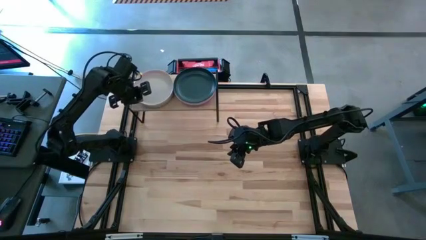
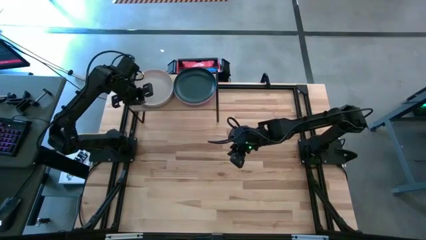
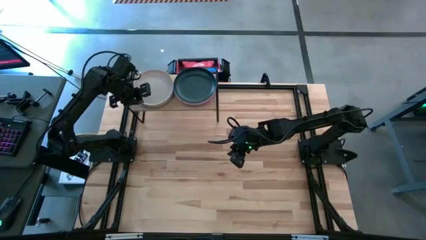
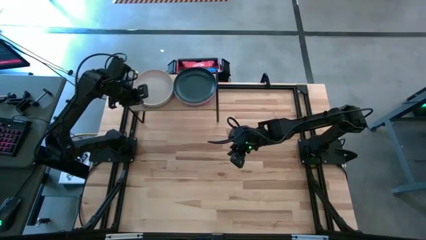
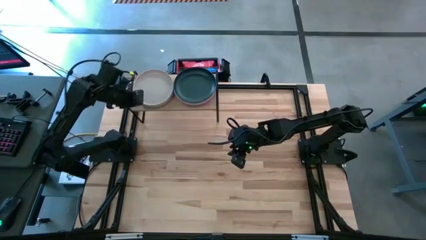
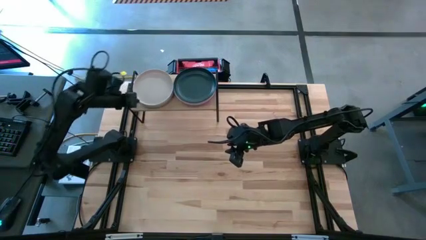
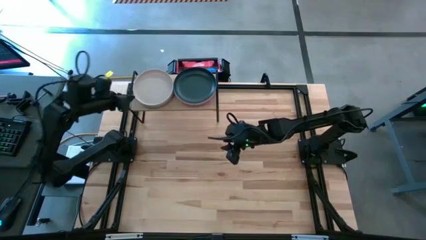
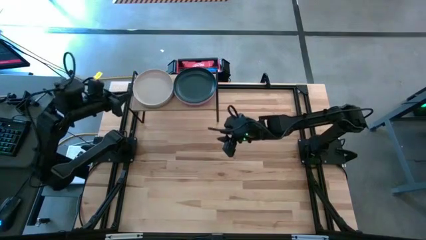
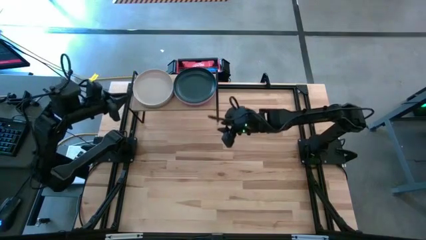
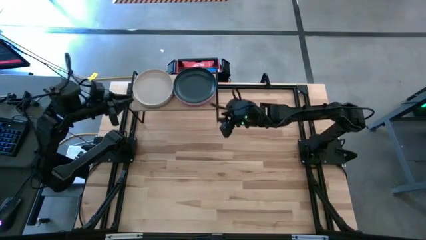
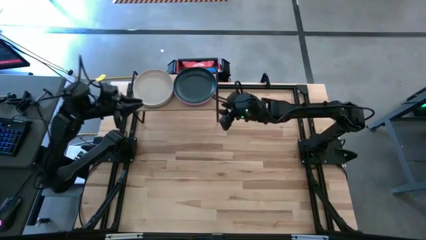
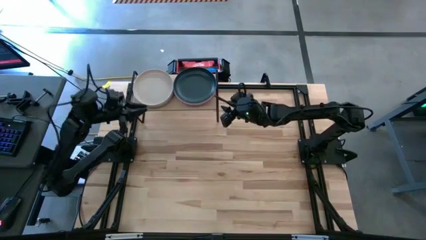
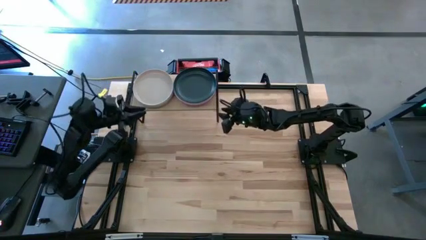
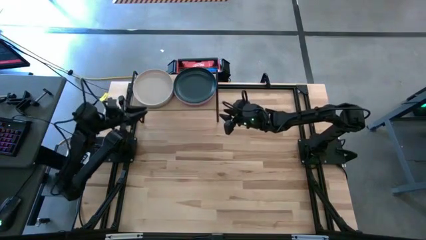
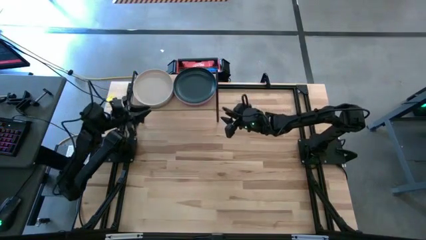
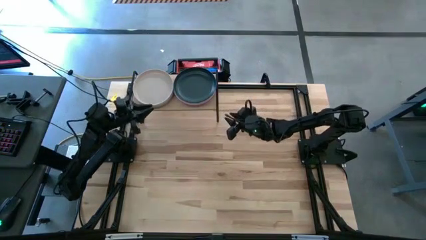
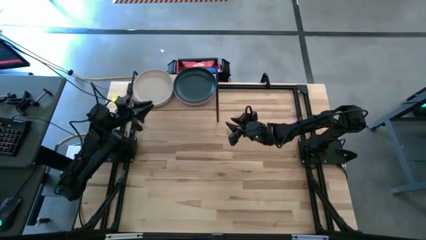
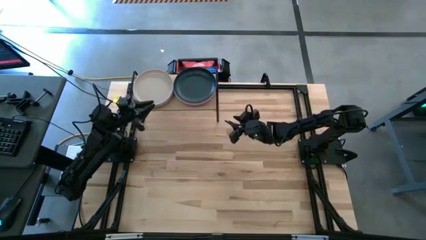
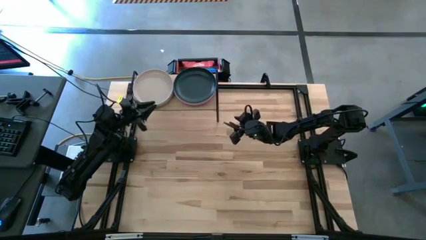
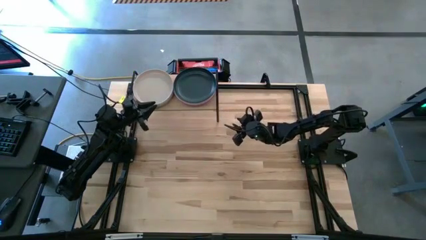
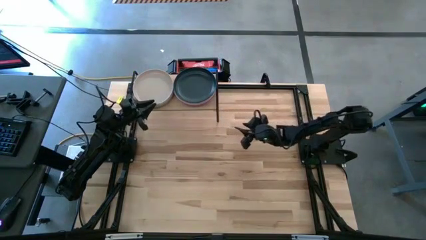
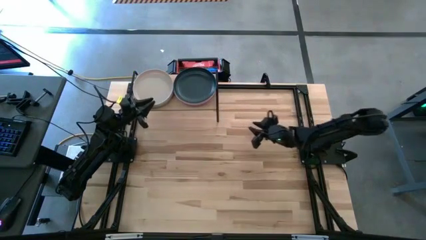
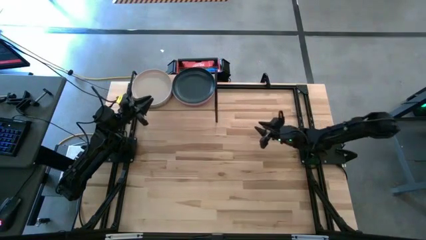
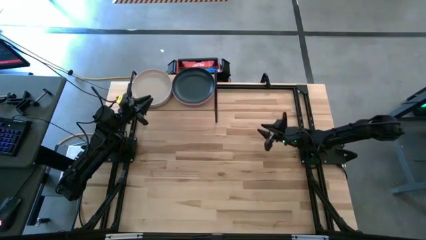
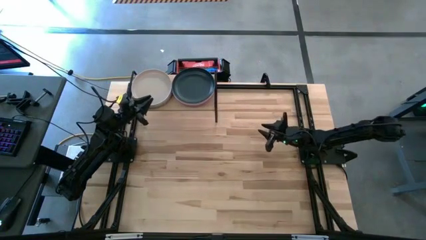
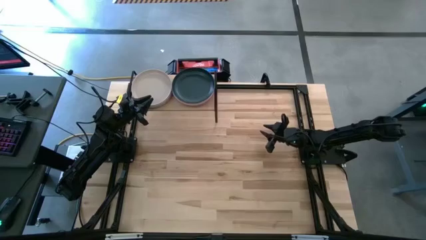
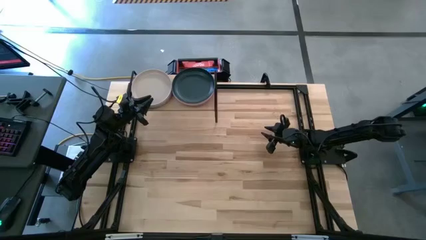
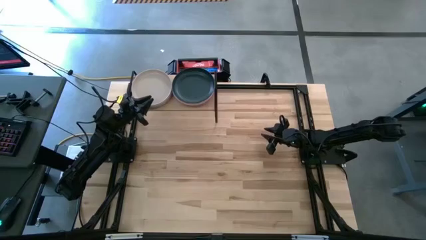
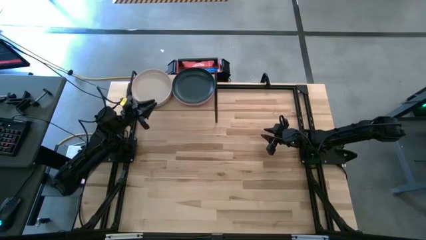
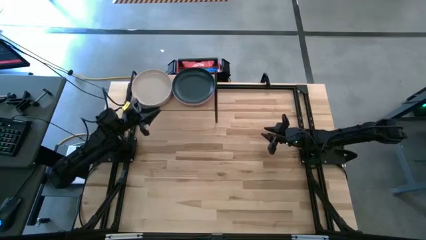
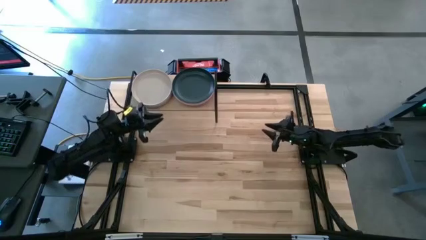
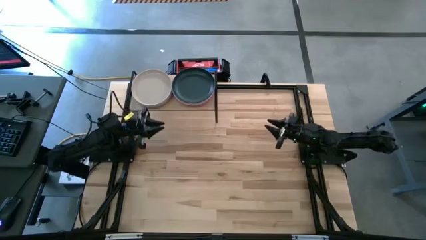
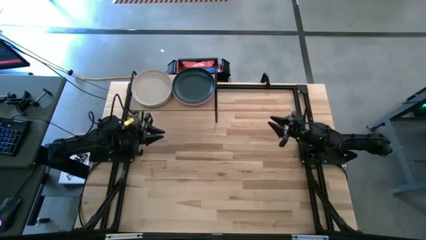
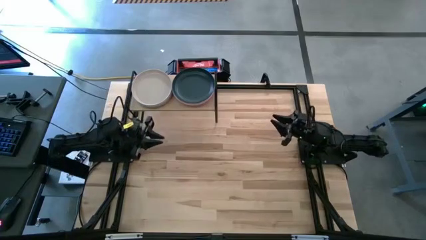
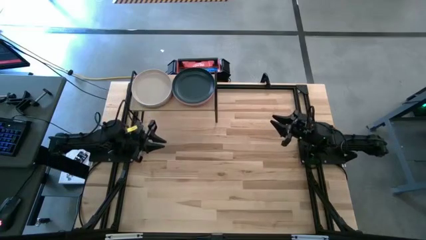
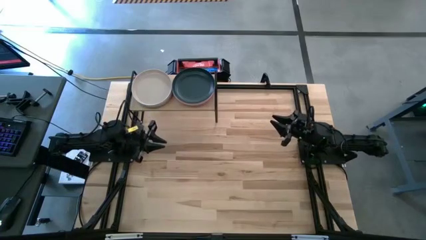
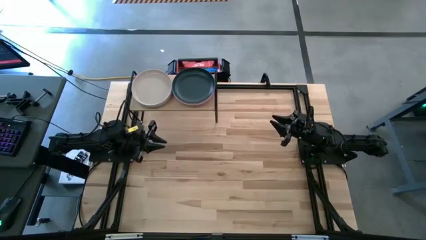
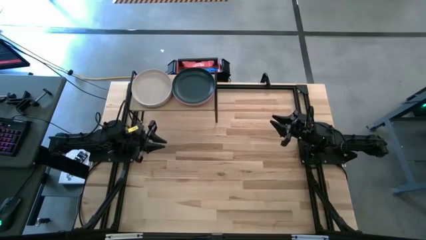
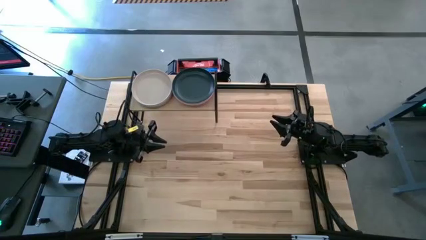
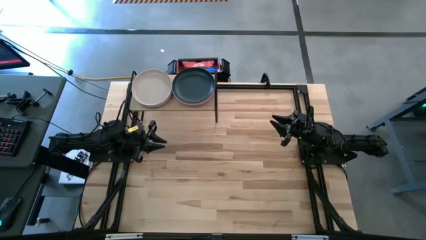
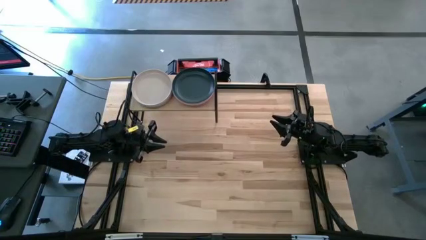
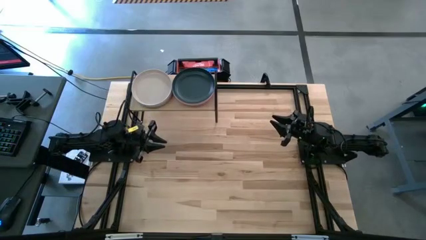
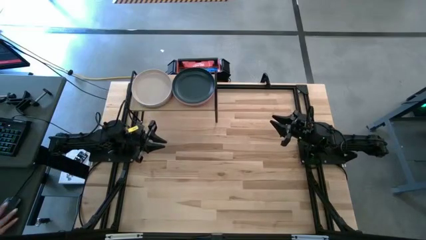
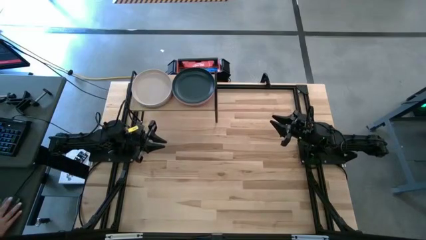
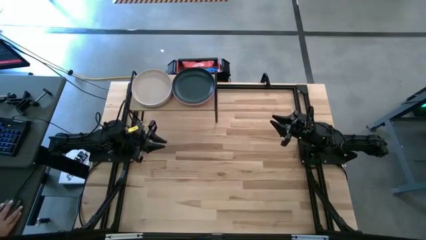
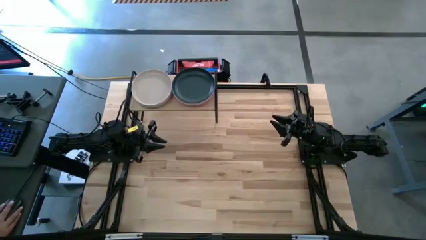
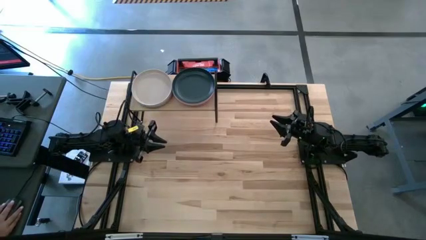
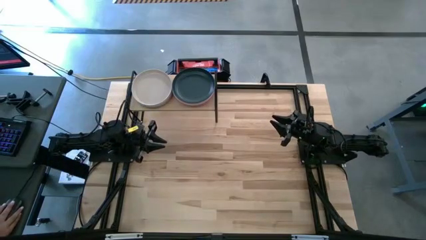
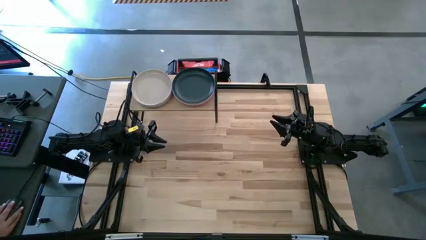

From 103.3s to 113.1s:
Task: Place and stack plates onto a shelf
Return to Home Position
